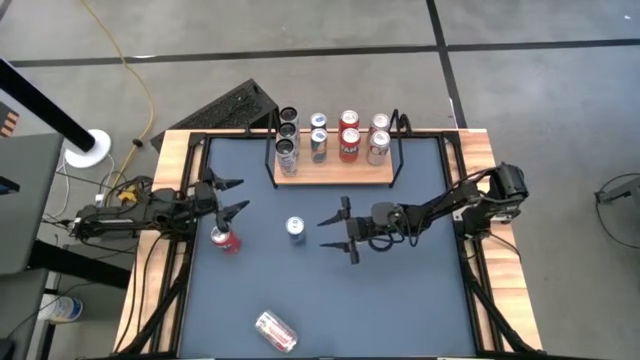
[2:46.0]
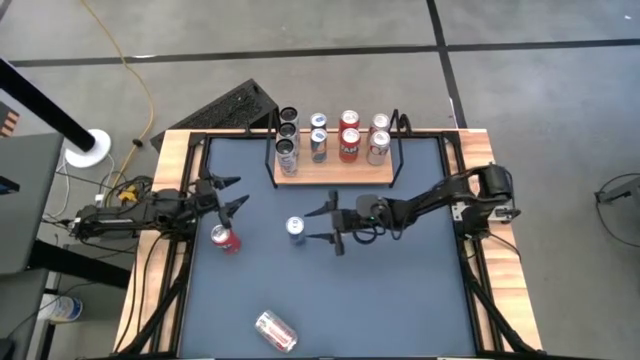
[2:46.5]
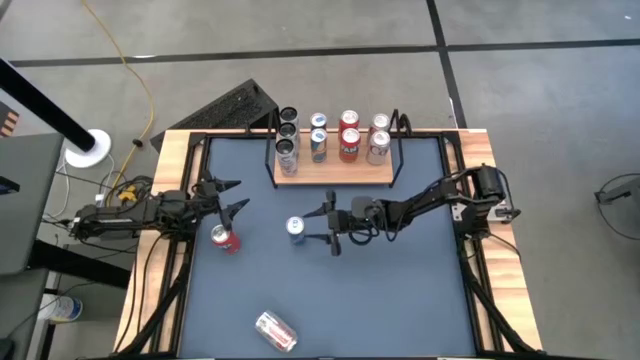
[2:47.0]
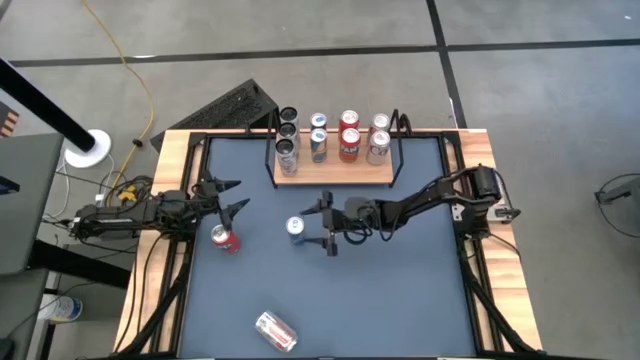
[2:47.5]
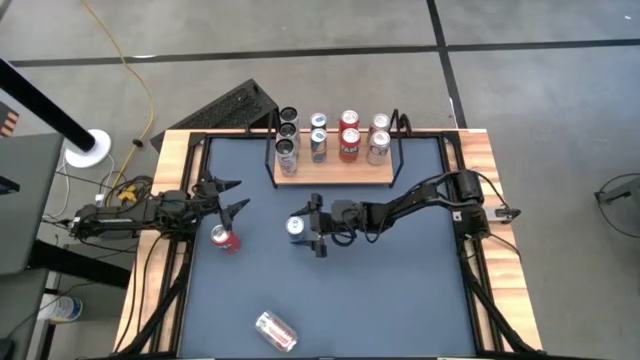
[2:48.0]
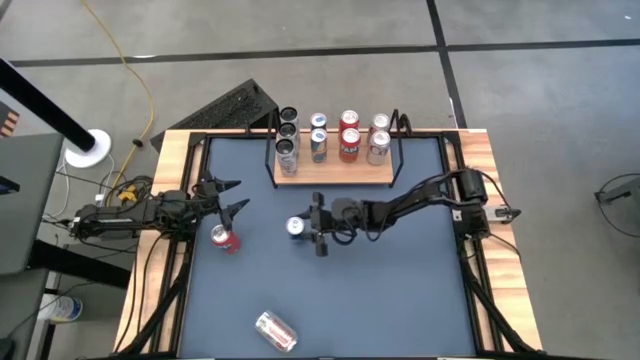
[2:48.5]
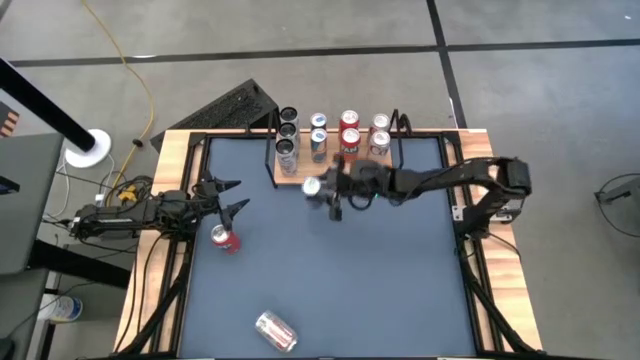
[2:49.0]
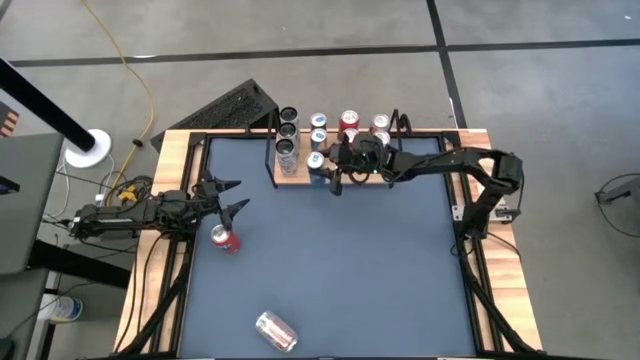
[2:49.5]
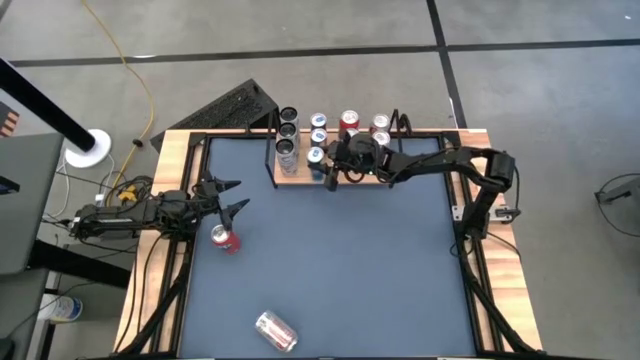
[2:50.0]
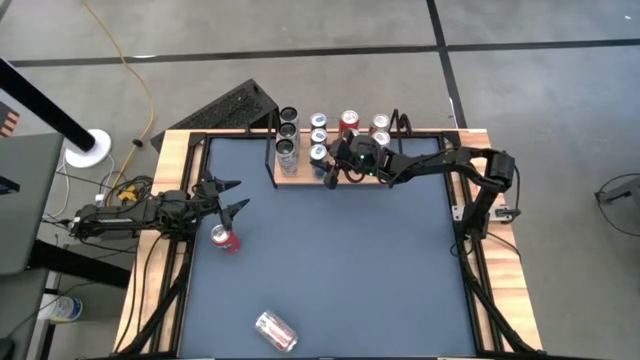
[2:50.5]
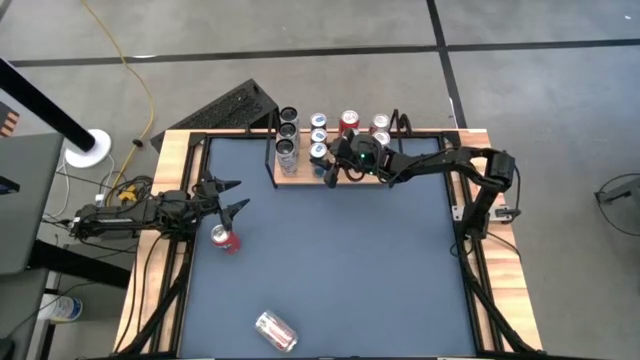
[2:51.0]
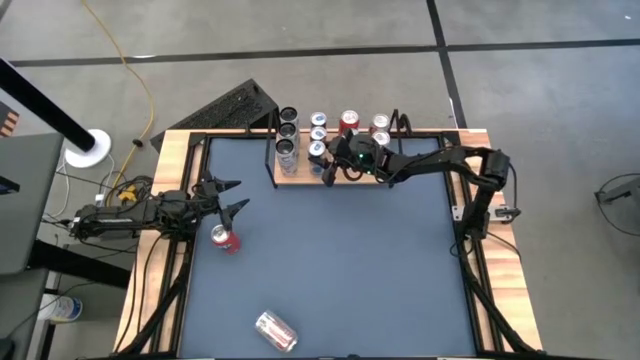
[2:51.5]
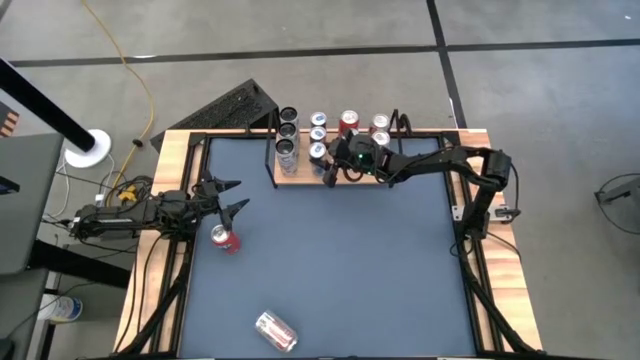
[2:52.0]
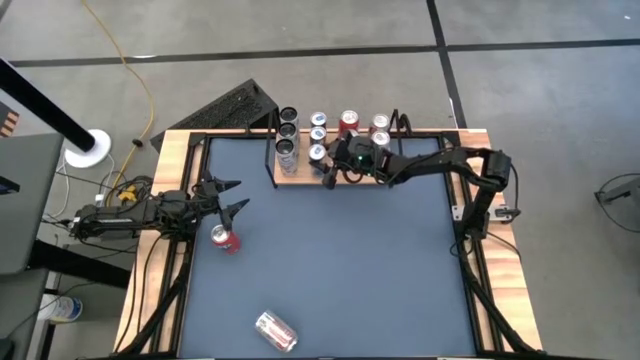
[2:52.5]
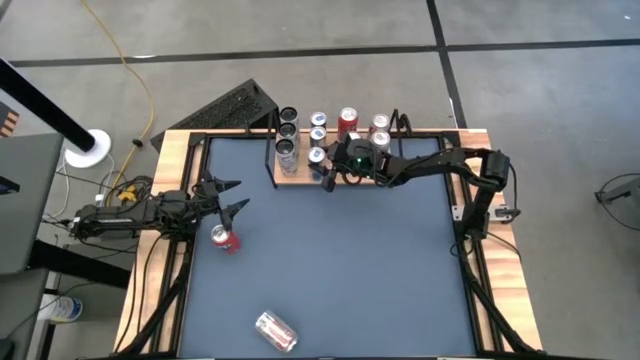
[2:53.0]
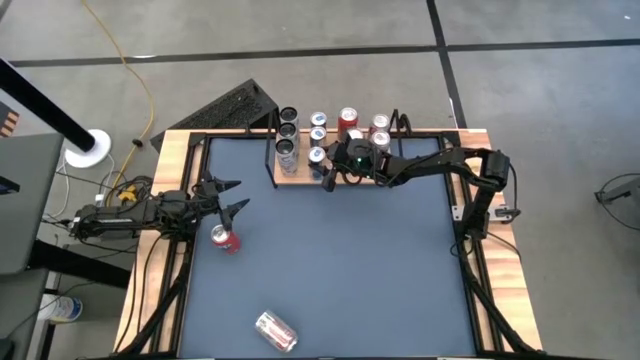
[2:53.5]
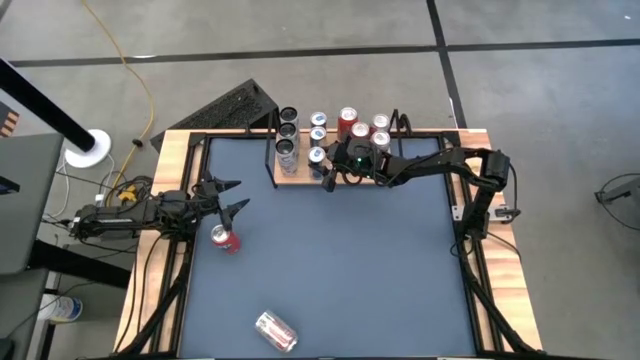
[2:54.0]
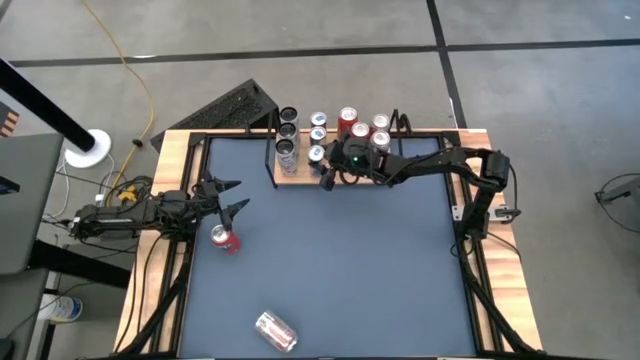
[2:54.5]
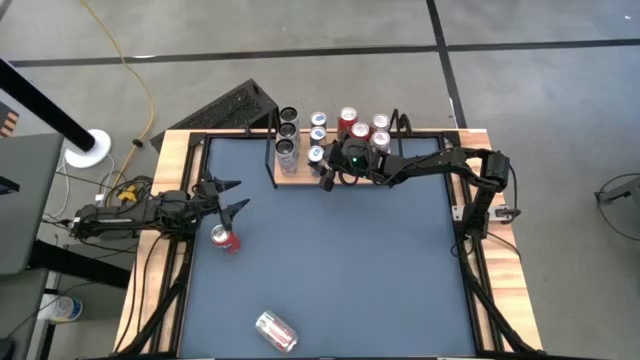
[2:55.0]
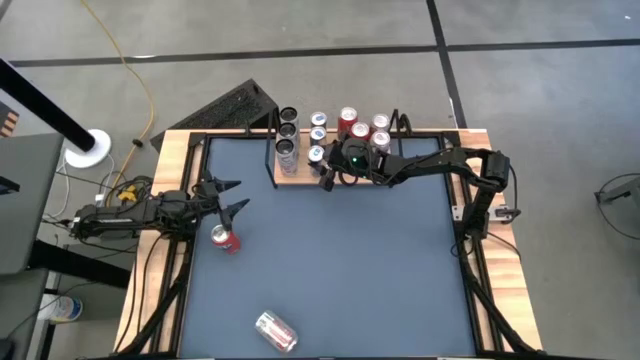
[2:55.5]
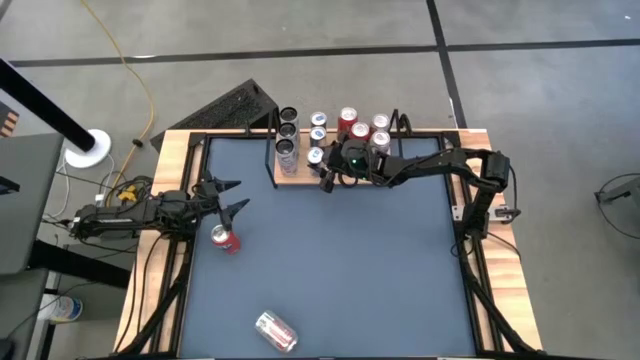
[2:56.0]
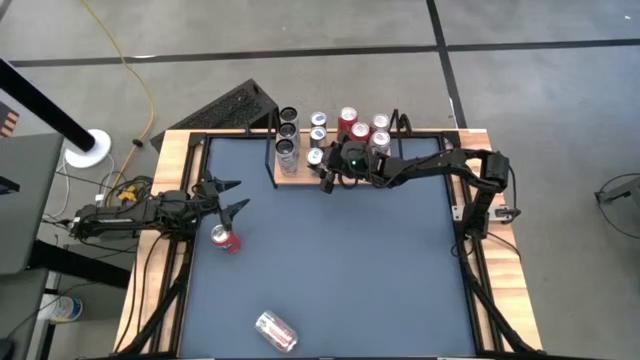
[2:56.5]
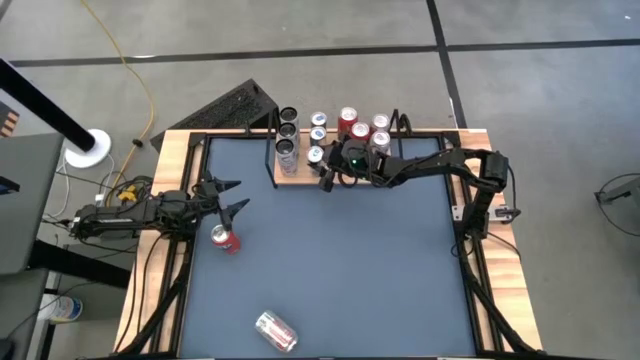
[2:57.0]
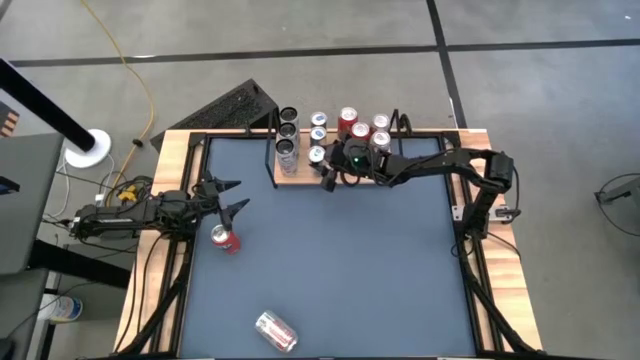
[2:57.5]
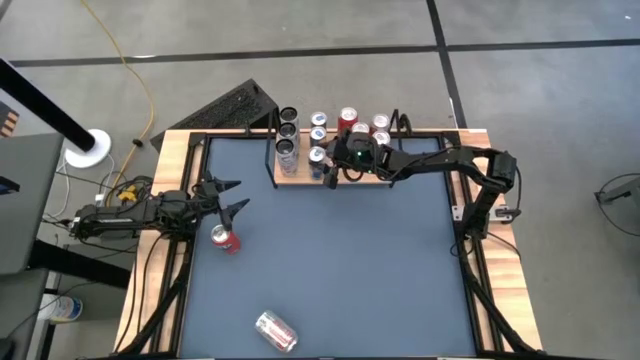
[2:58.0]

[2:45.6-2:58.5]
Task: Place canned beverage on shelf
Put the blue soda can on the shelf aligned with the other blue soda cans

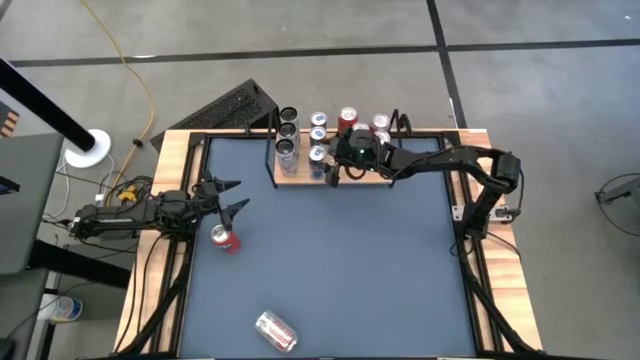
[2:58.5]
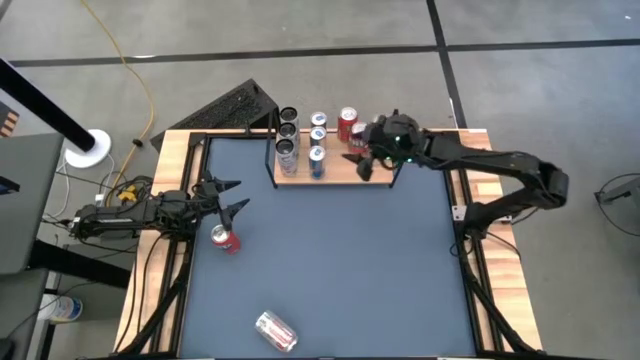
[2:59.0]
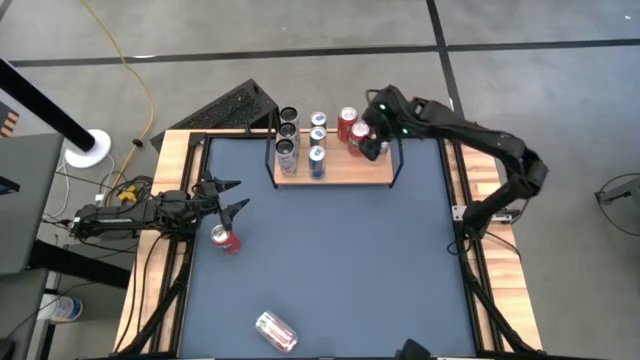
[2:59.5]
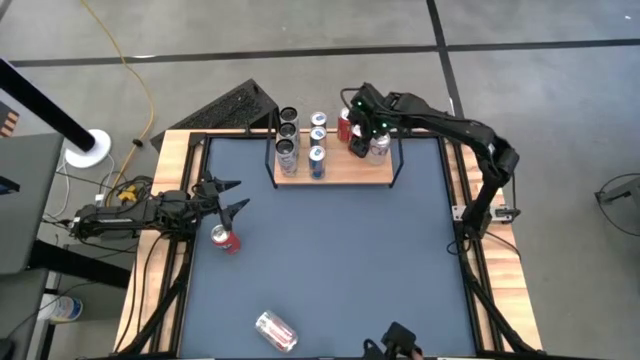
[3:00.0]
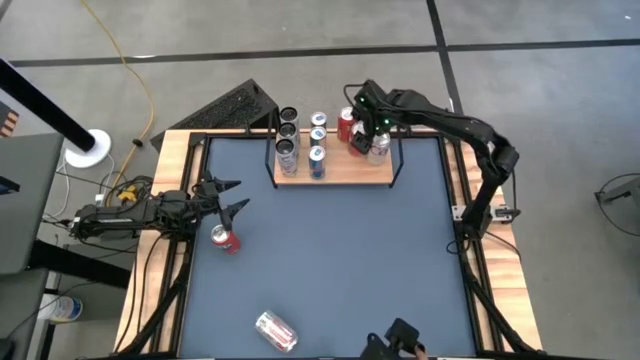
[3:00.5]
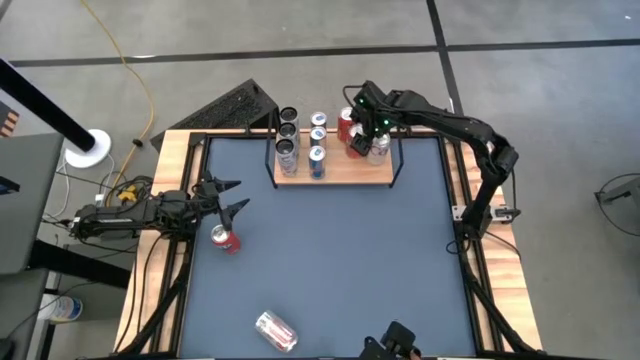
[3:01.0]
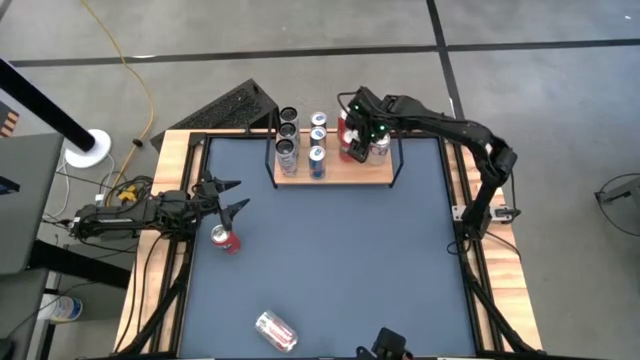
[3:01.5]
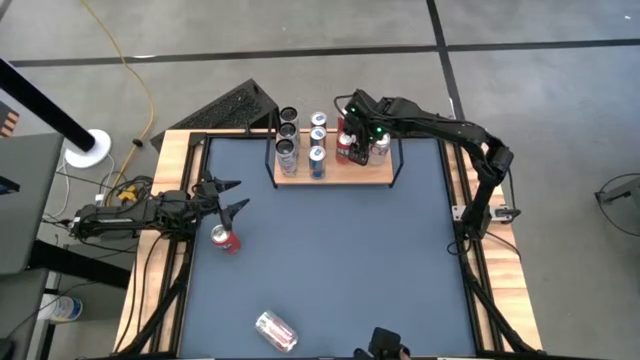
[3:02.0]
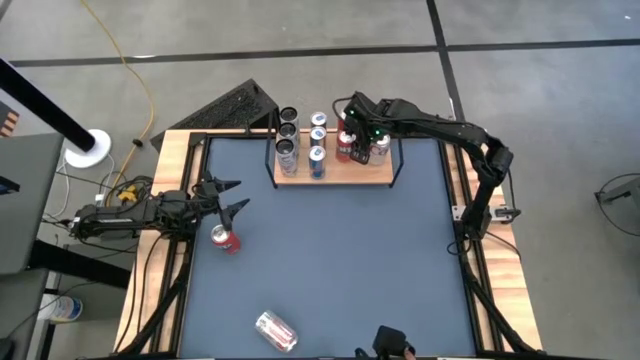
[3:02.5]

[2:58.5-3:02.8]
Adjust the red soda can on the shelf

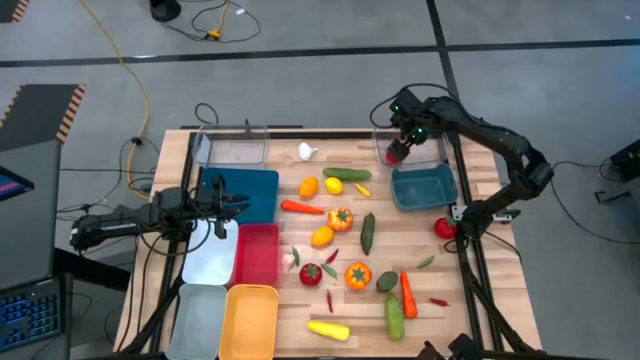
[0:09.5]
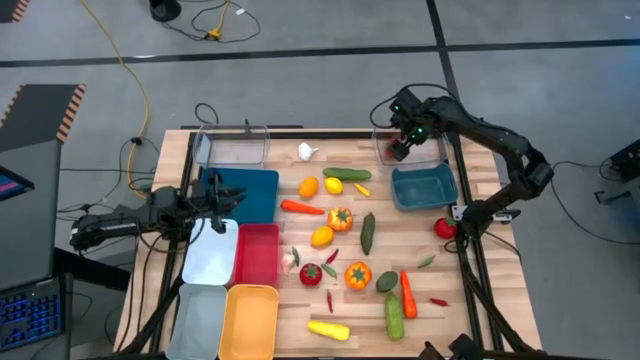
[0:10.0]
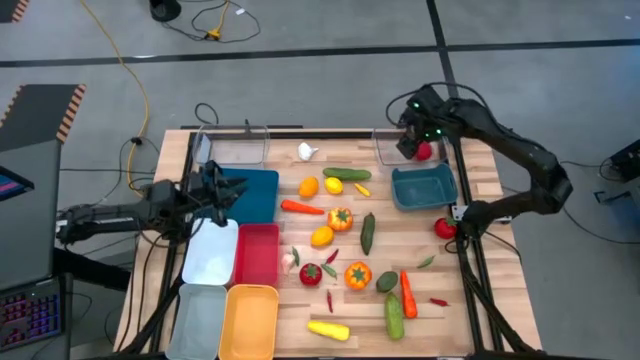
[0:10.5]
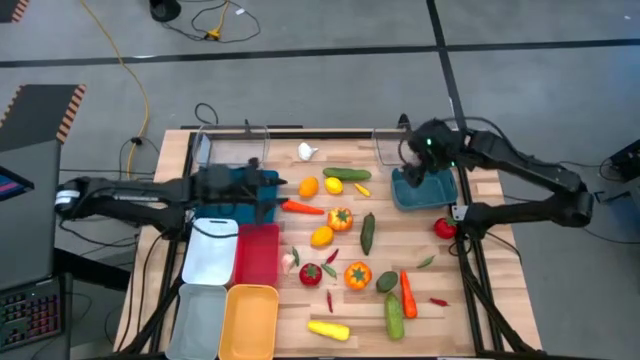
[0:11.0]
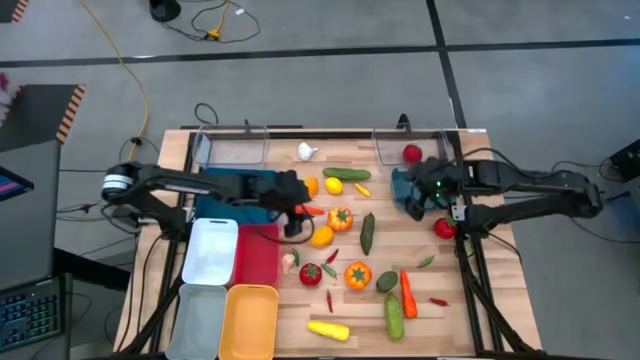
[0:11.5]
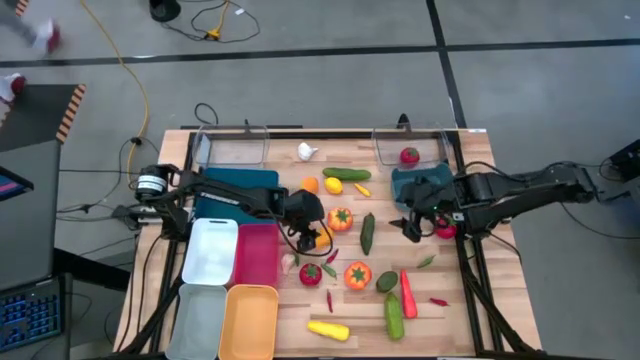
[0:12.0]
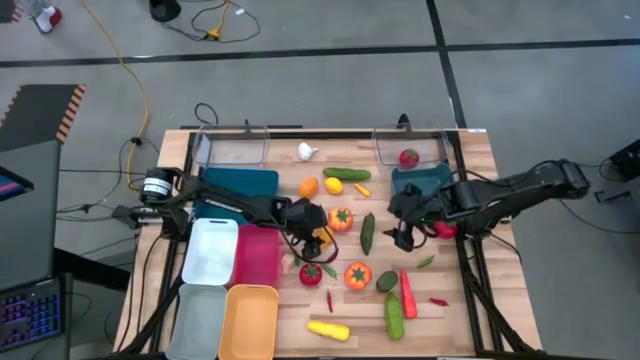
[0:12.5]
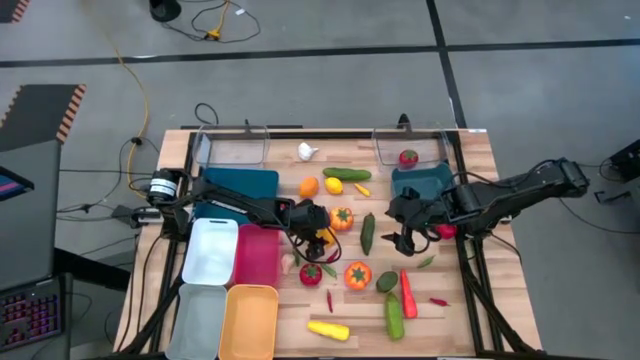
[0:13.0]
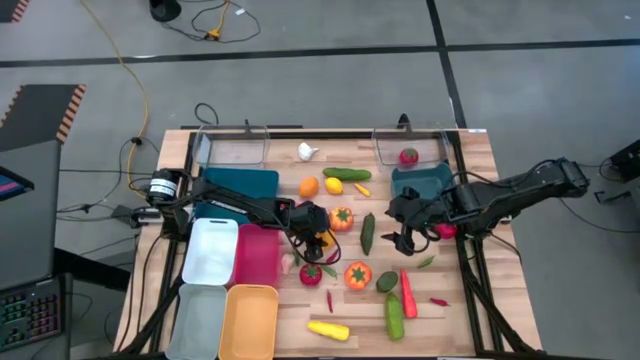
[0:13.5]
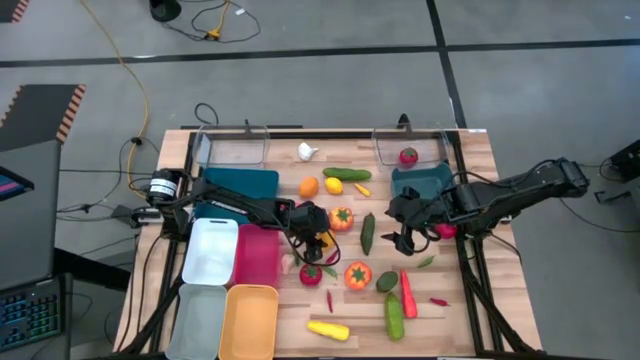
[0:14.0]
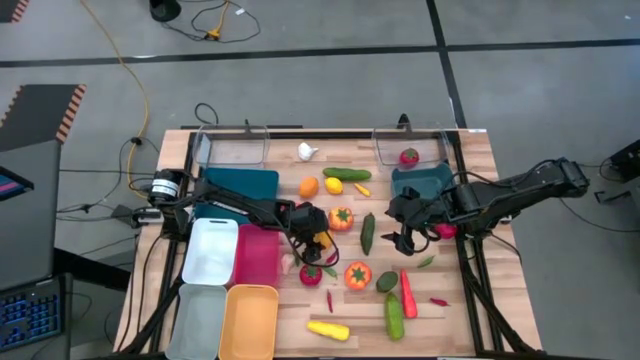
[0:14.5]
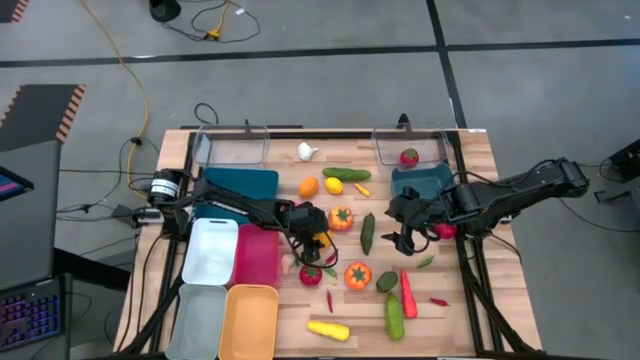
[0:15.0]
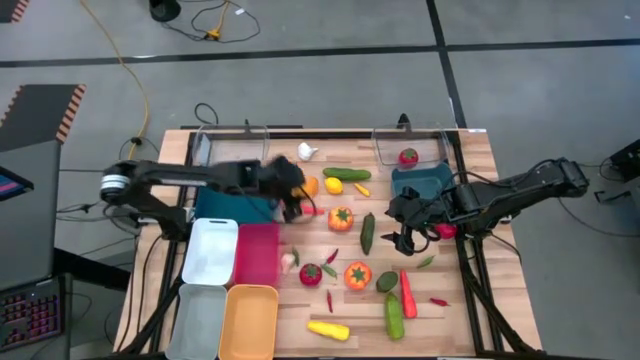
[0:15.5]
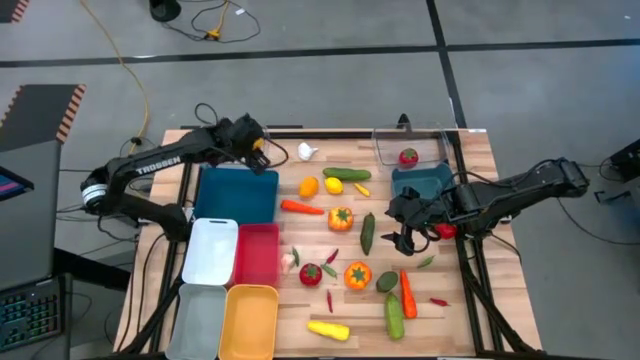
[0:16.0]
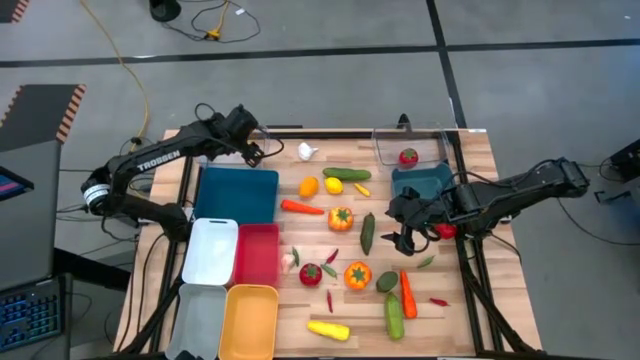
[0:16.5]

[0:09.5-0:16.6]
Task: Sort produce into baskets
Put the bottom yellow lemon into the left transparent bin
